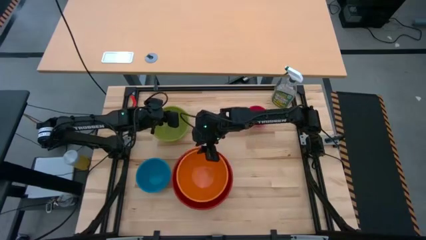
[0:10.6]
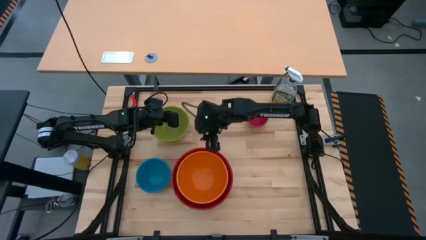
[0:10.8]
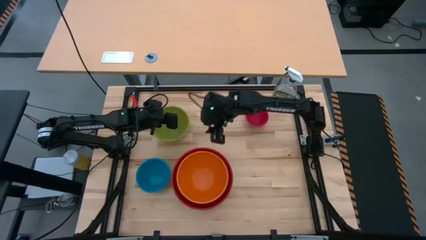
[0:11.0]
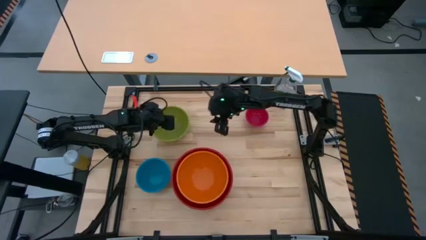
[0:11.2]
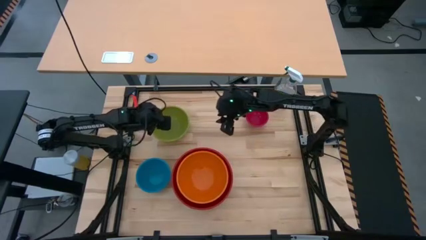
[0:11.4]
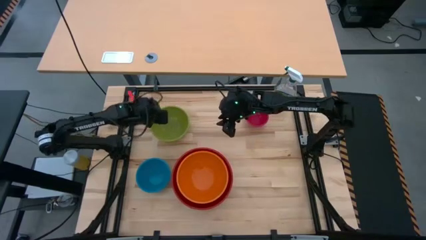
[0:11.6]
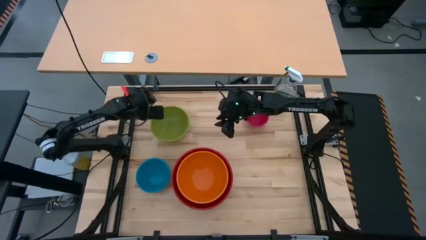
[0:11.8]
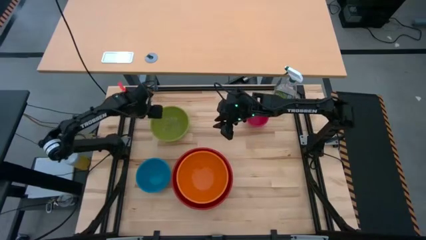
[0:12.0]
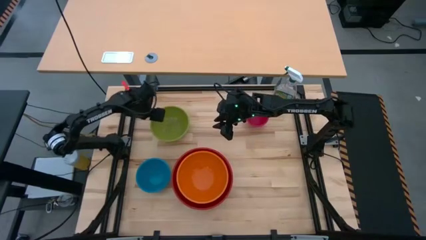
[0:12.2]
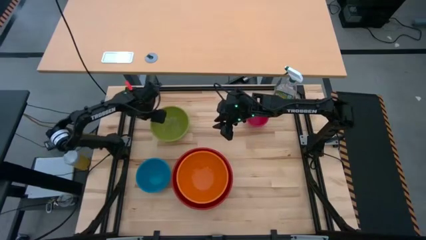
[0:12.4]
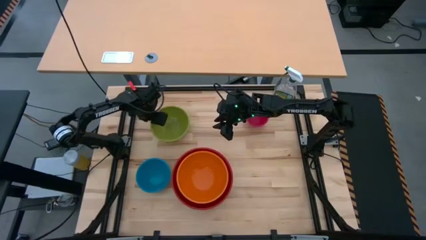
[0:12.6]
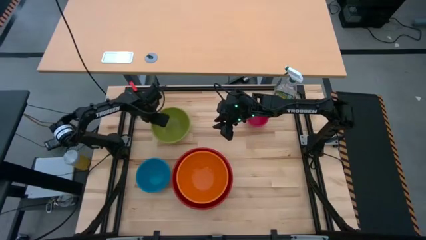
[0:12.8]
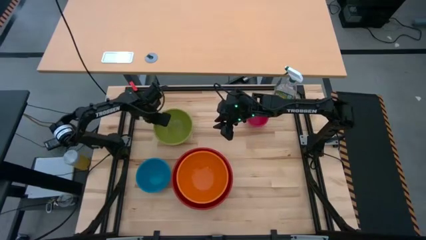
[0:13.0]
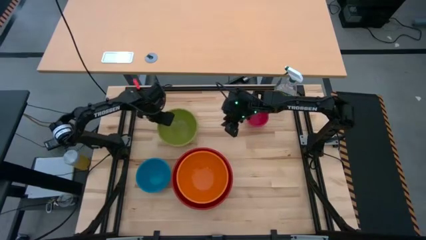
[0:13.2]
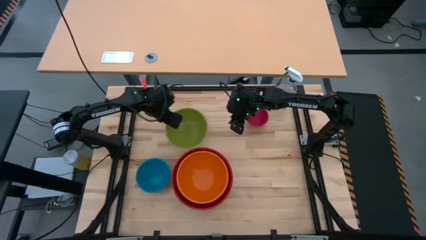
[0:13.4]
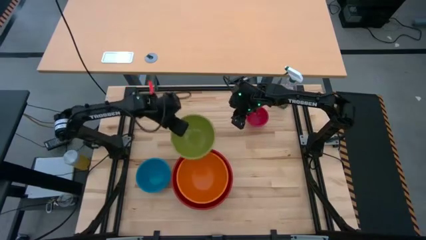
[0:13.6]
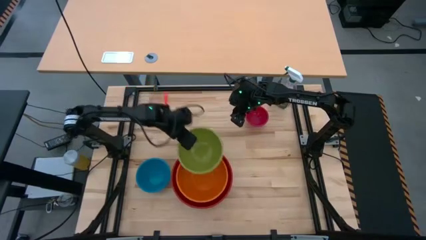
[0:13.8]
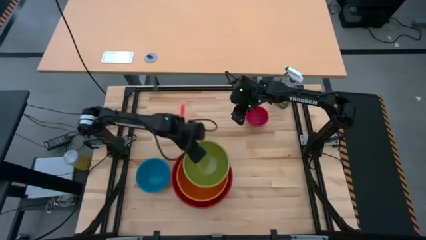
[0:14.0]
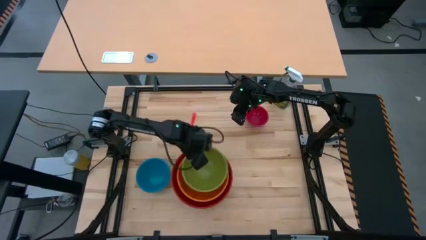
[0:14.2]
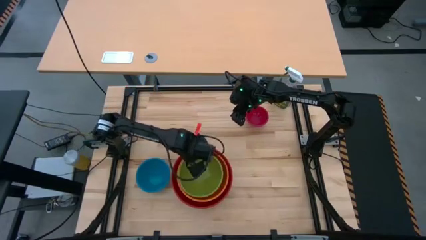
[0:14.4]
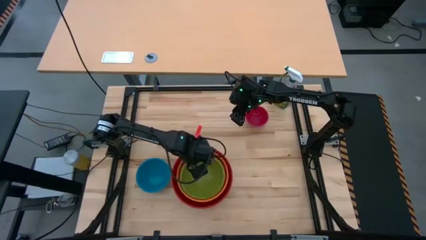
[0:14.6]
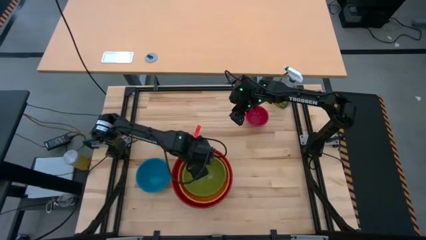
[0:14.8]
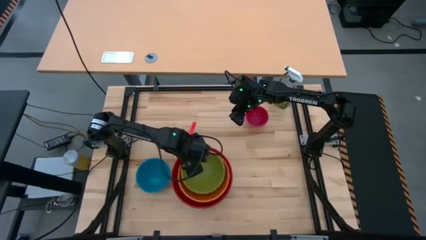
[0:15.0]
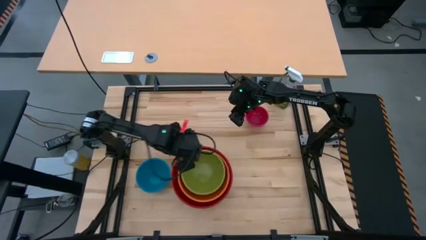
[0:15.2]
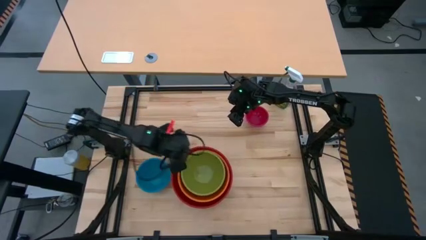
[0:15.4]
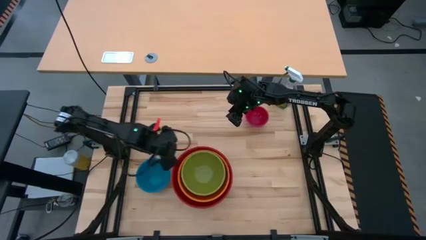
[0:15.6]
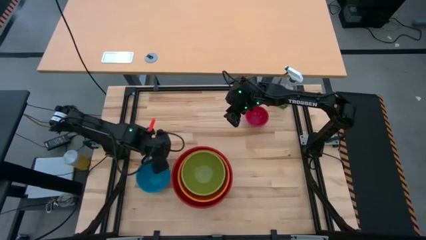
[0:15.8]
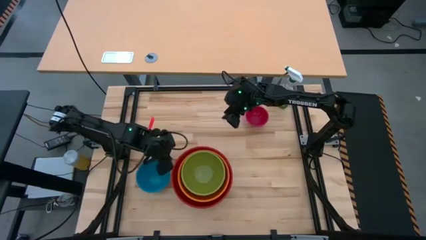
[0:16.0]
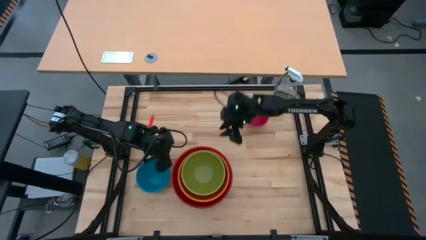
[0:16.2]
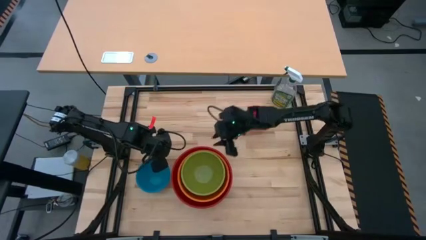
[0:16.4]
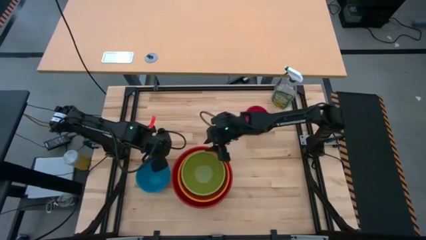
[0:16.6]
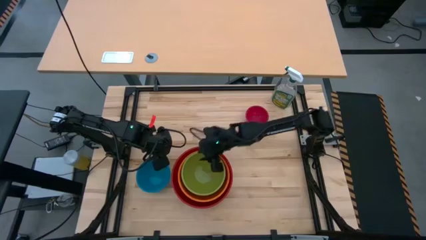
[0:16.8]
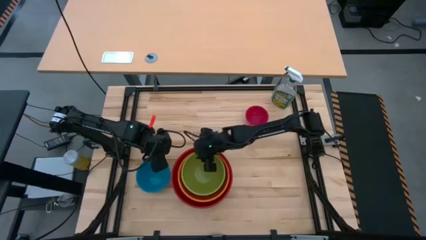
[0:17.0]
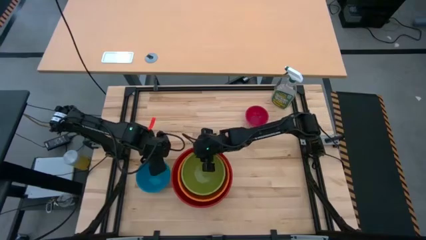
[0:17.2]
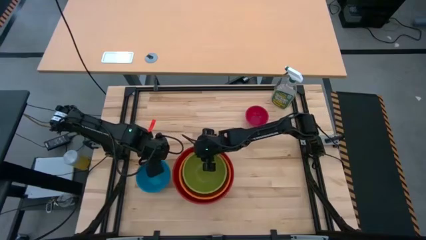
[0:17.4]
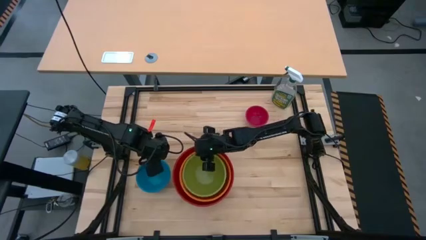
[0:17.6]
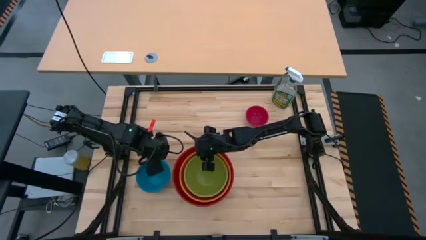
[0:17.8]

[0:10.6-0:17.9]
Stack the green bowl on top of the orange bowl

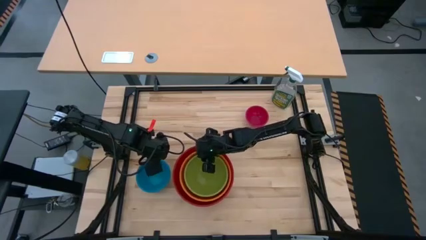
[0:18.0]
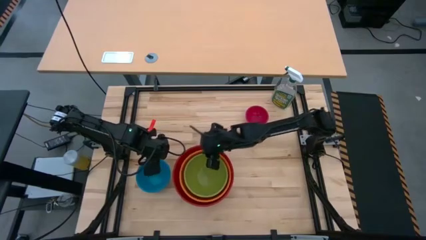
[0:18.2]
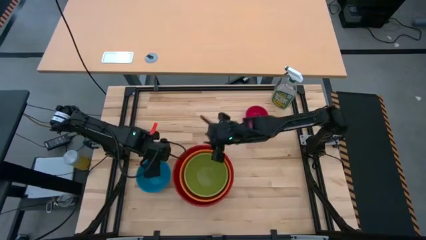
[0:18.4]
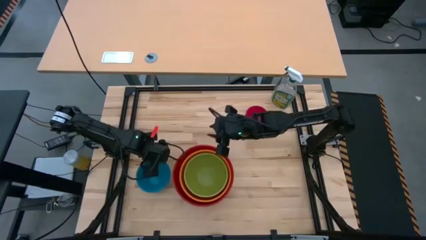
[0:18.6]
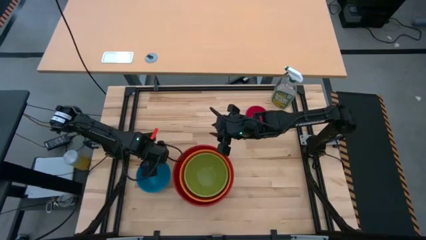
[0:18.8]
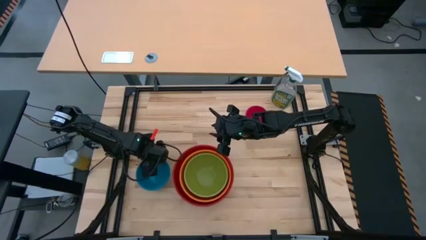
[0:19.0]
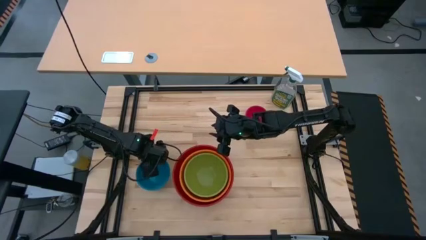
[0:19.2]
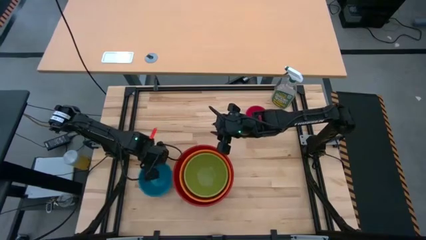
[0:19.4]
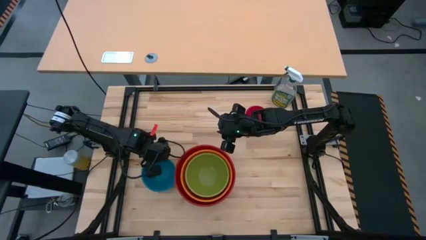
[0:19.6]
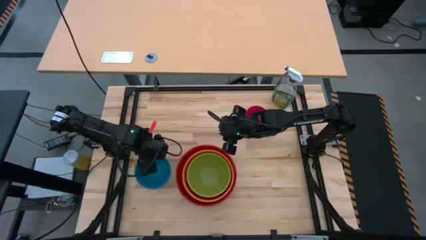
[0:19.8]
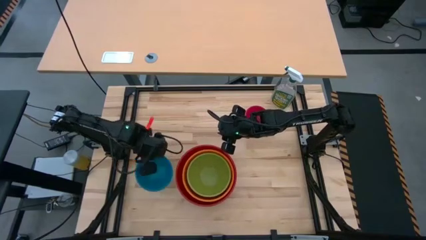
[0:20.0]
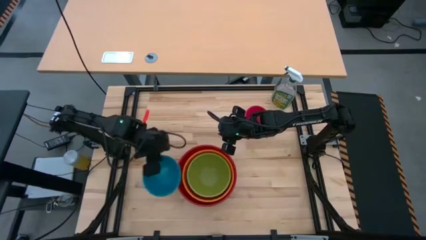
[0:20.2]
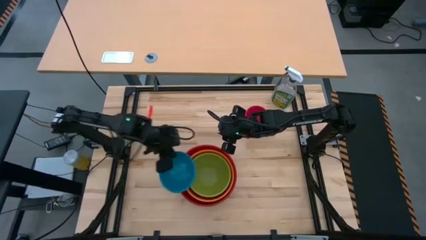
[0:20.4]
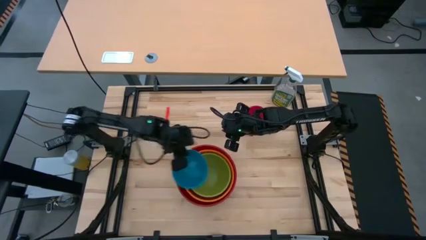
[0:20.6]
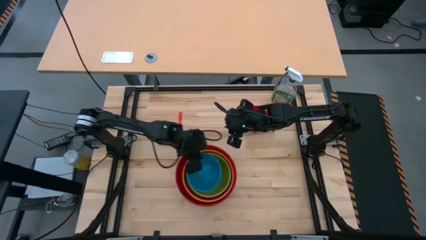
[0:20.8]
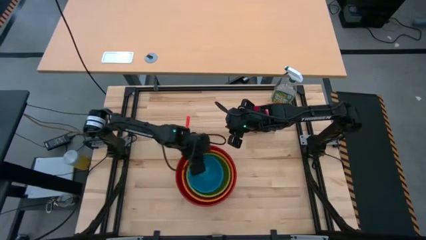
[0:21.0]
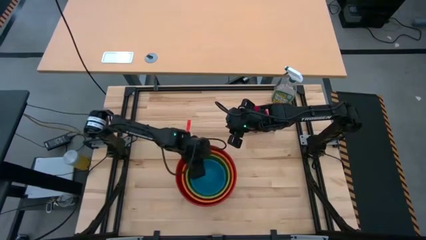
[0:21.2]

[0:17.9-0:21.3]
Stack the blue bowl on top of the green bowl

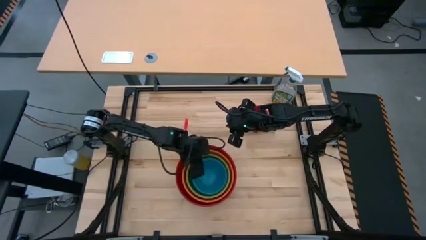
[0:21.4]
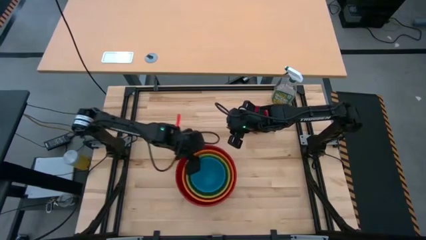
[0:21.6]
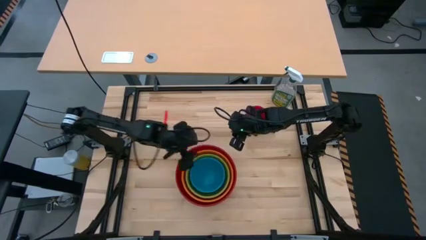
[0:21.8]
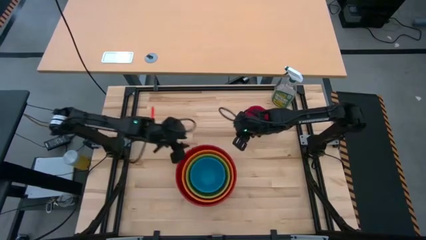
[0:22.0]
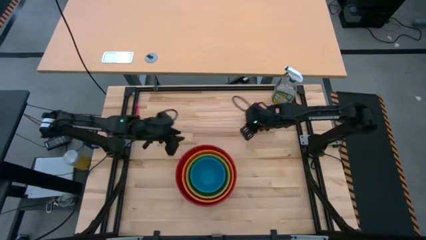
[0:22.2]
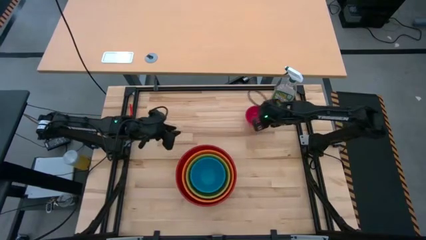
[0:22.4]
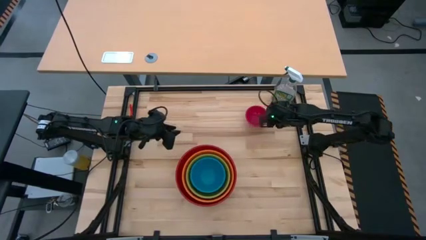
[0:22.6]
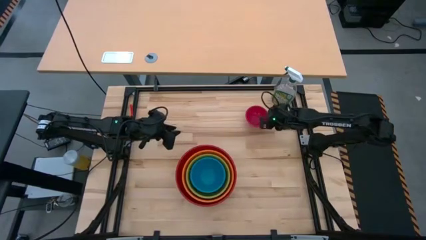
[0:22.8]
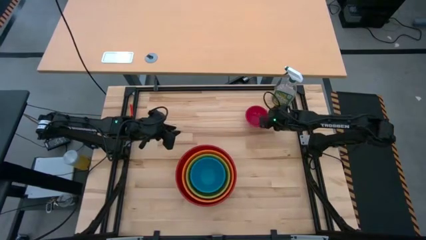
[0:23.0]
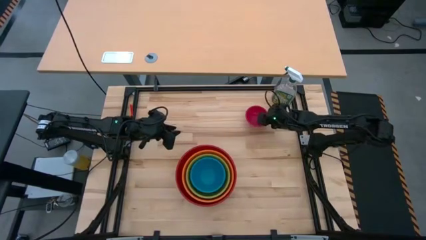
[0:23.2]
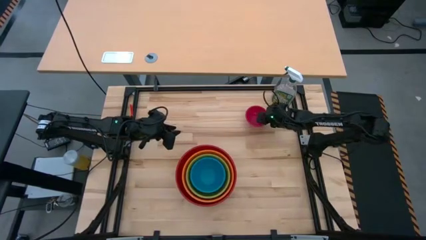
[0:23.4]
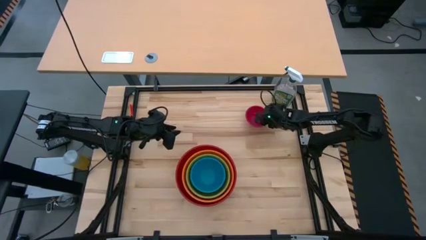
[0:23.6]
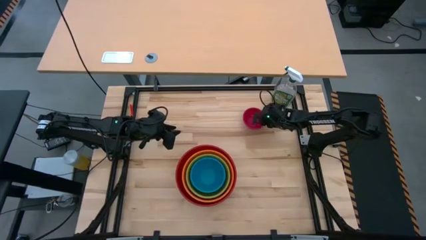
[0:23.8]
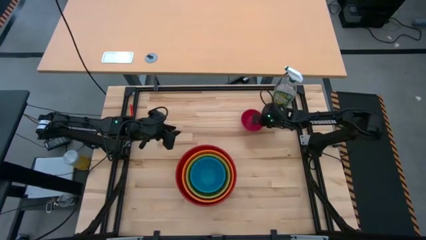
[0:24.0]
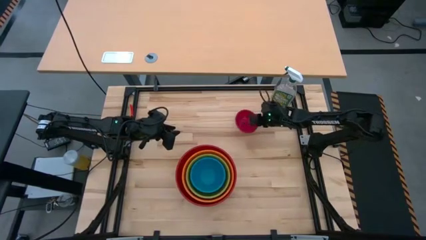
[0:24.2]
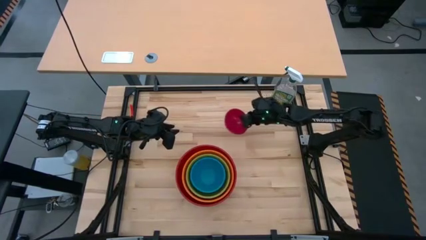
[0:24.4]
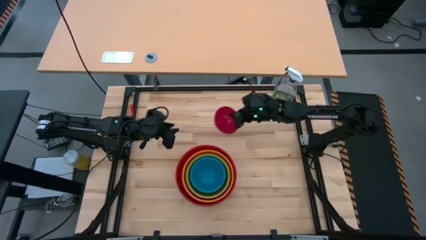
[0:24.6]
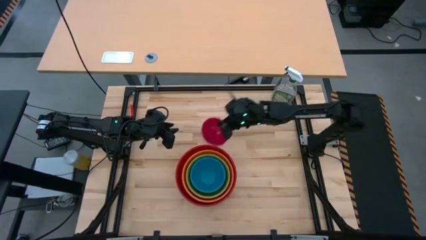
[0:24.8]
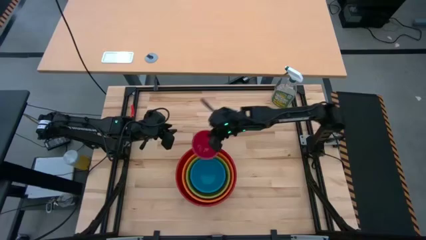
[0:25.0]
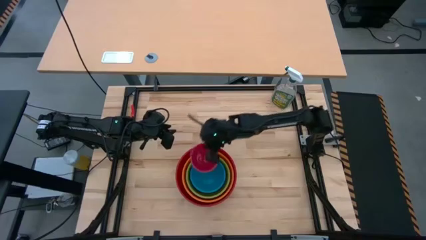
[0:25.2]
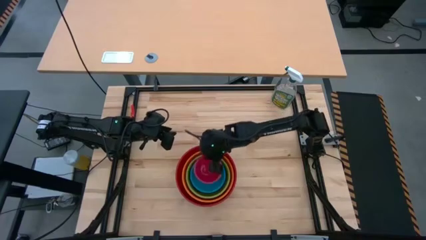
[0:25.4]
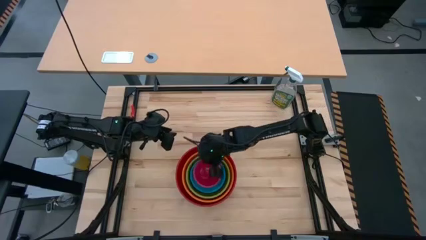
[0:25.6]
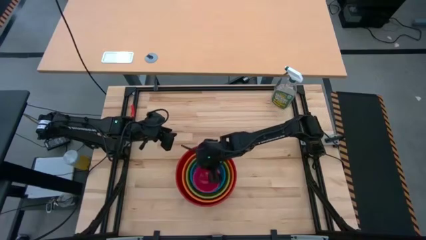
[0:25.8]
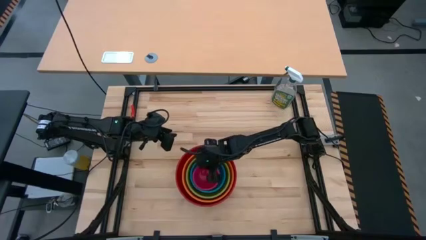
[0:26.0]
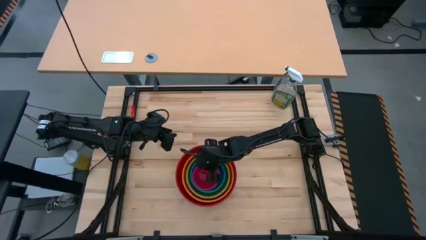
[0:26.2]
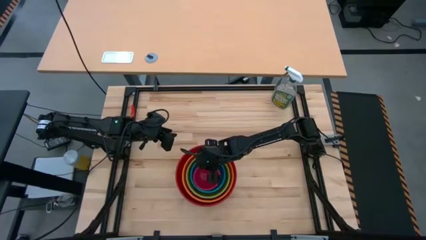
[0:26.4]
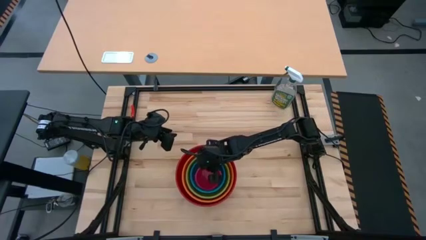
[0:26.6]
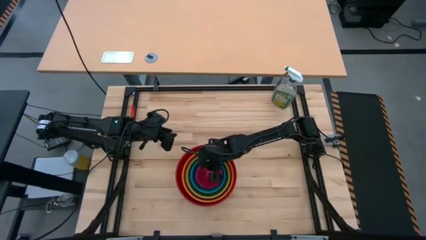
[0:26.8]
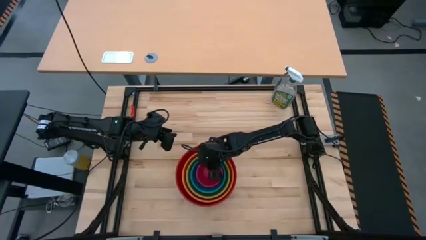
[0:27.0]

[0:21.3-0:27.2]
Stack the pink bowl on top of the blue bowl
